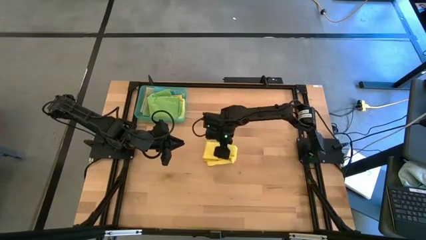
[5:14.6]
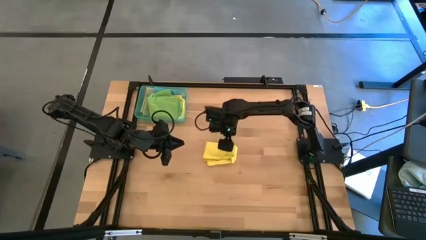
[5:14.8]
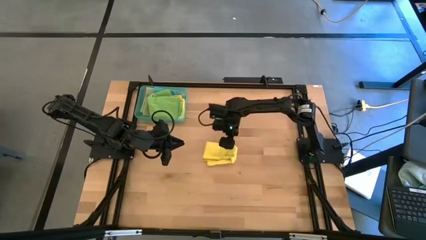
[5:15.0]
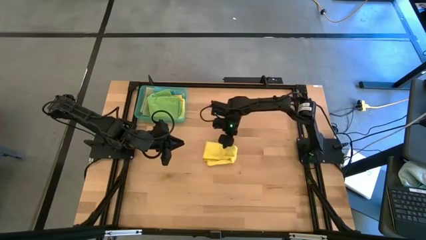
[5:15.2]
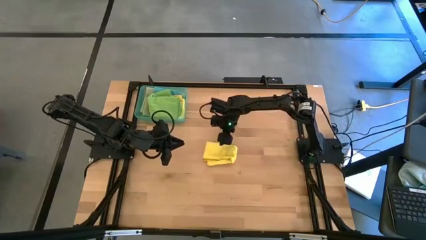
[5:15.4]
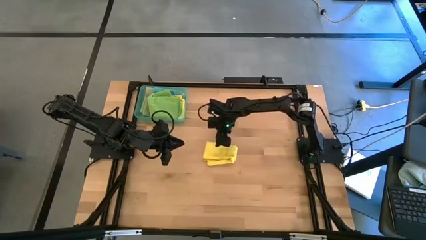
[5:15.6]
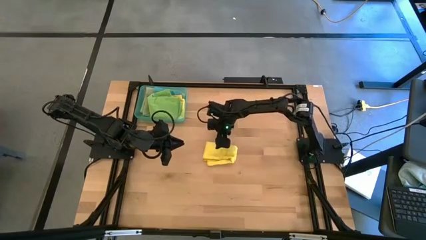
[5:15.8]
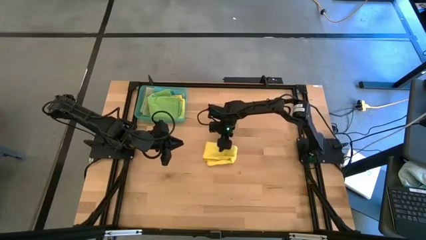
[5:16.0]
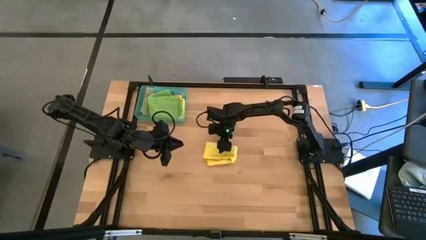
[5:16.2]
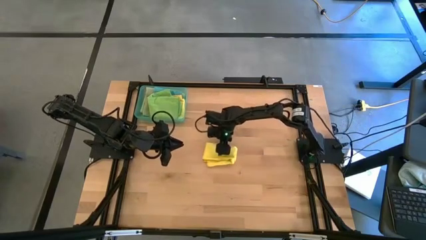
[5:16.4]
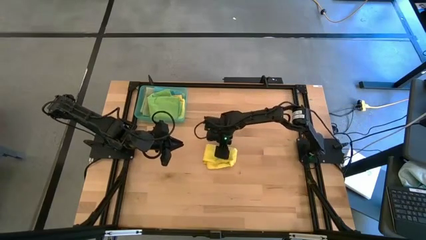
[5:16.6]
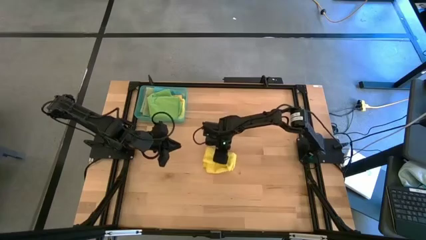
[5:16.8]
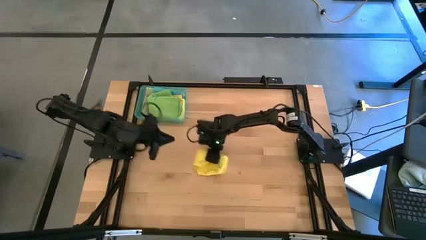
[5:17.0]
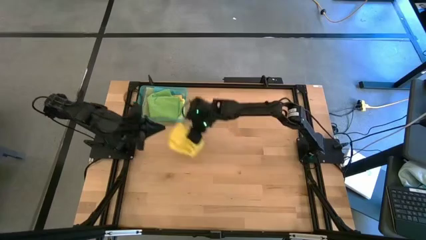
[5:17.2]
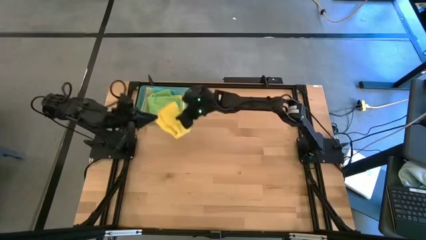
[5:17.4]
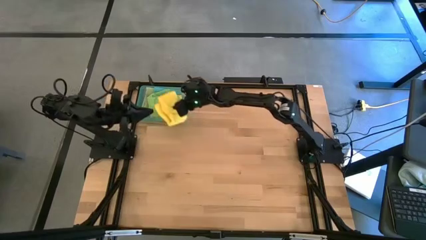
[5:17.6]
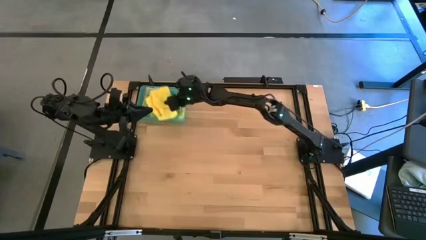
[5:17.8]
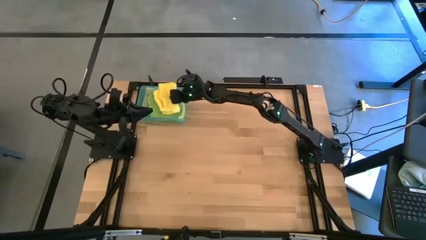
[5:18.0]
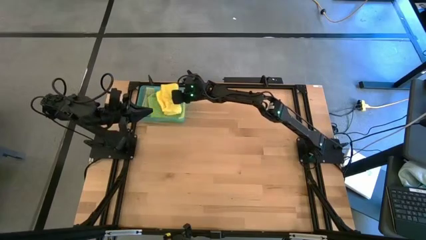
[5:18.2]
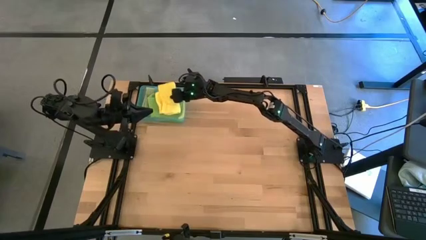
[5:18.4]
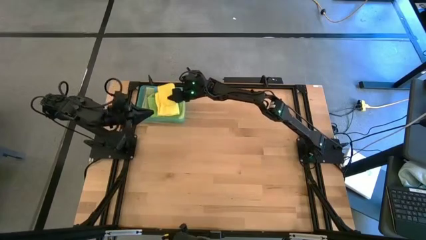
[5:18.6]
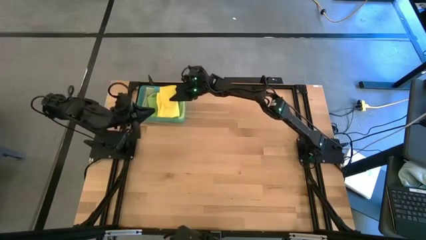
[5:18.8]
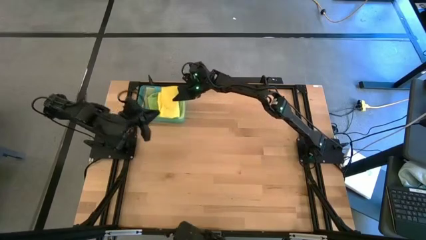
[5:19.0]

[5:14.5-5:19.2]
Task: Fold microfiber towels
Stack the folded yellow microfiber cloth on top of the green microfiber cloth in the blue bin

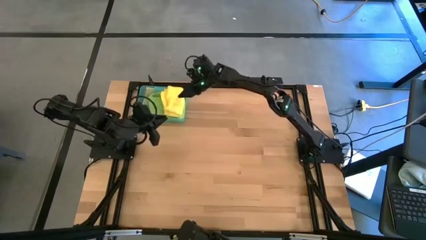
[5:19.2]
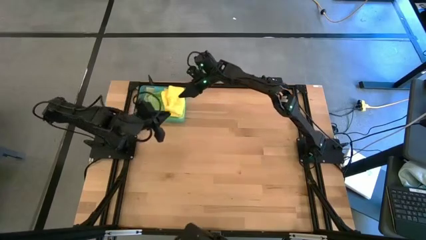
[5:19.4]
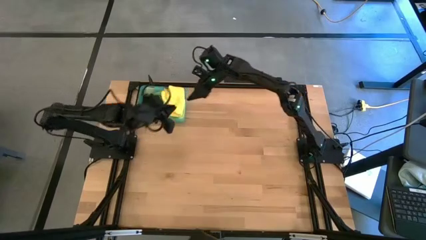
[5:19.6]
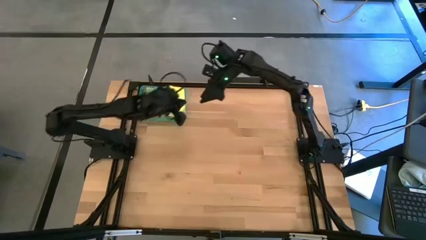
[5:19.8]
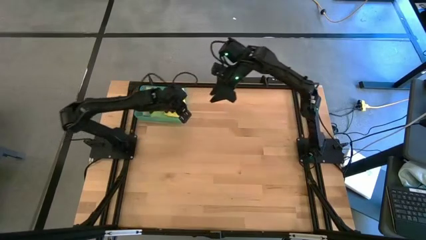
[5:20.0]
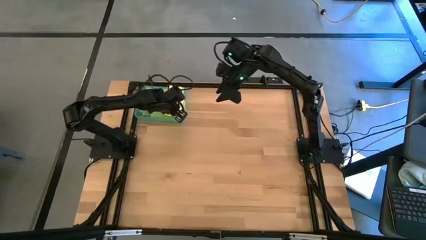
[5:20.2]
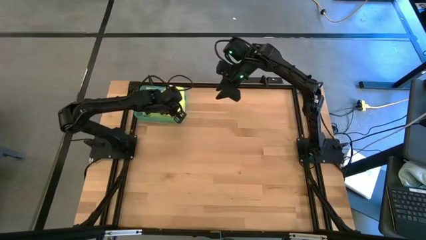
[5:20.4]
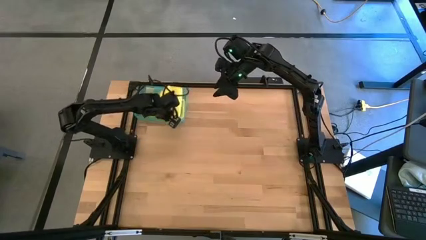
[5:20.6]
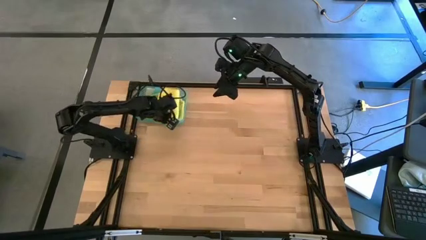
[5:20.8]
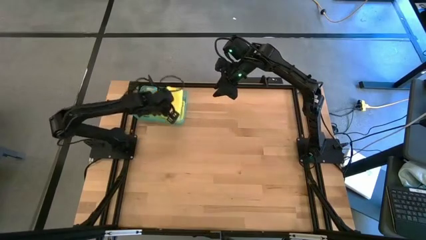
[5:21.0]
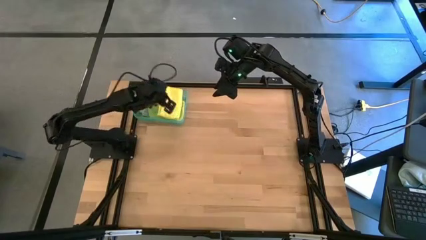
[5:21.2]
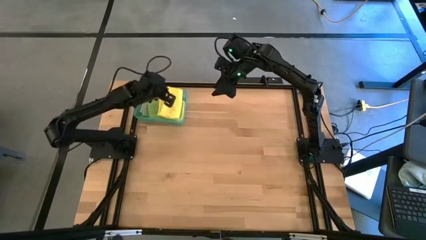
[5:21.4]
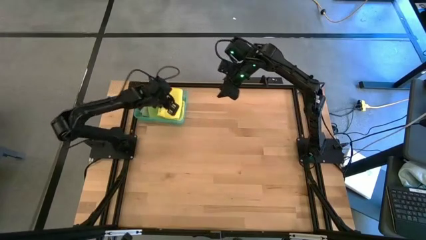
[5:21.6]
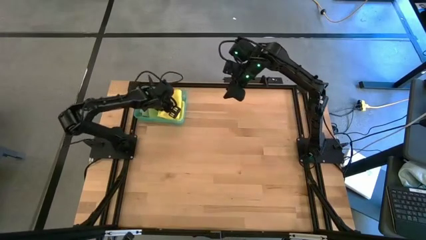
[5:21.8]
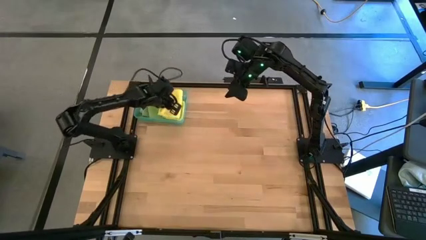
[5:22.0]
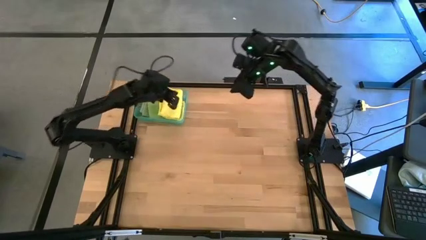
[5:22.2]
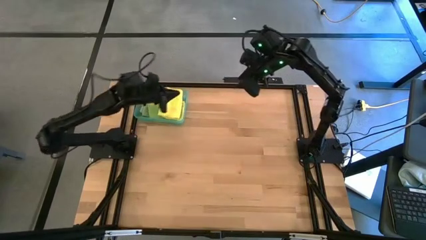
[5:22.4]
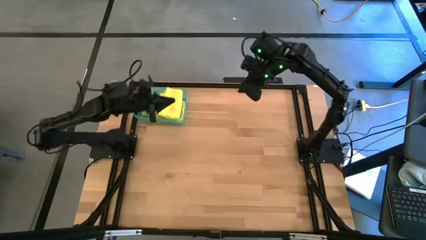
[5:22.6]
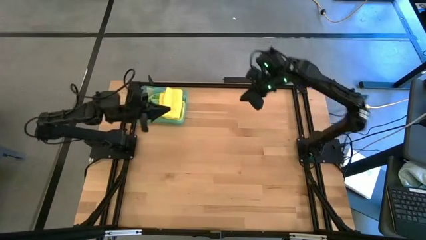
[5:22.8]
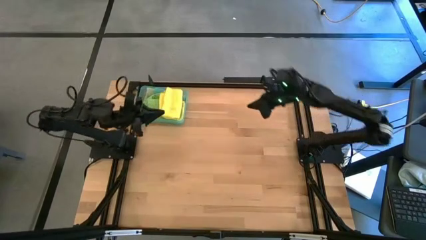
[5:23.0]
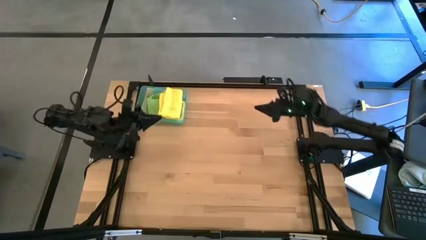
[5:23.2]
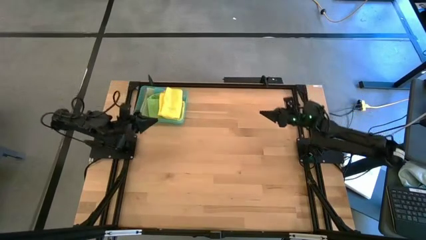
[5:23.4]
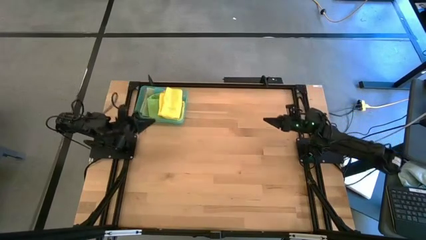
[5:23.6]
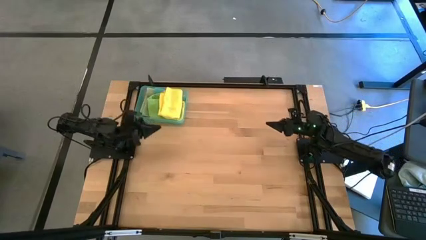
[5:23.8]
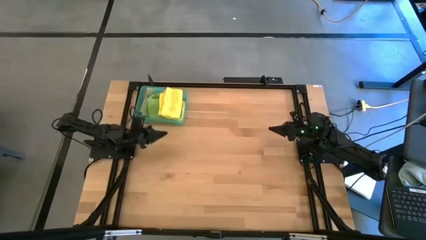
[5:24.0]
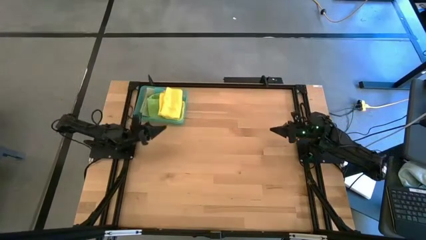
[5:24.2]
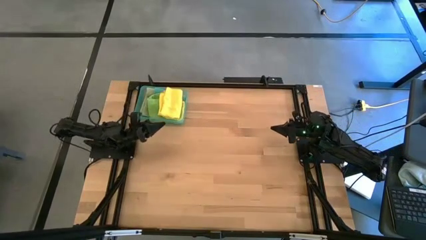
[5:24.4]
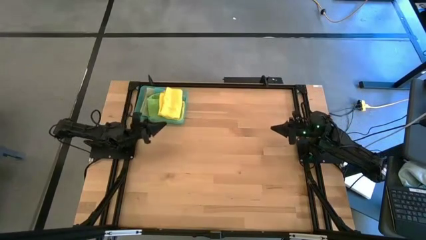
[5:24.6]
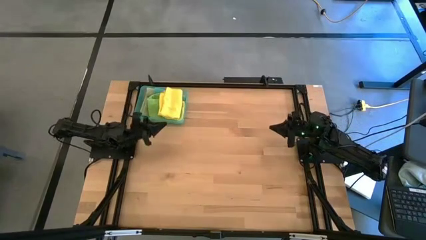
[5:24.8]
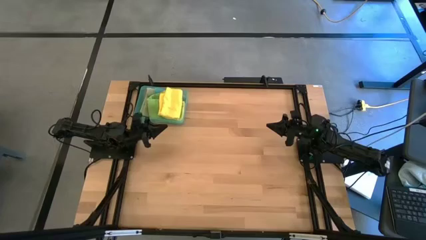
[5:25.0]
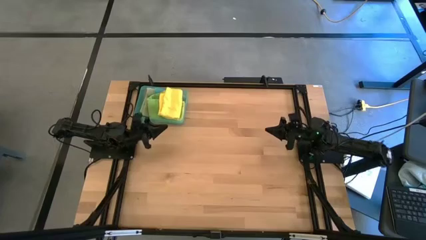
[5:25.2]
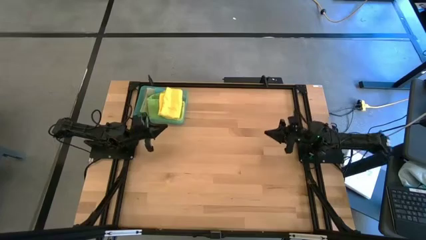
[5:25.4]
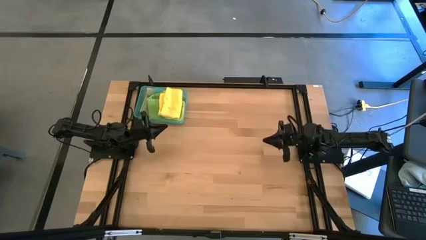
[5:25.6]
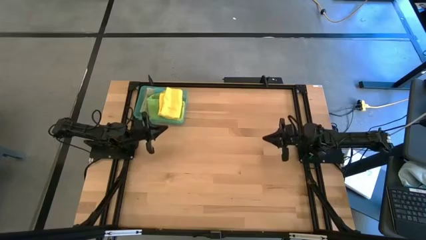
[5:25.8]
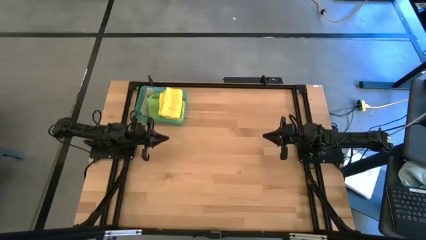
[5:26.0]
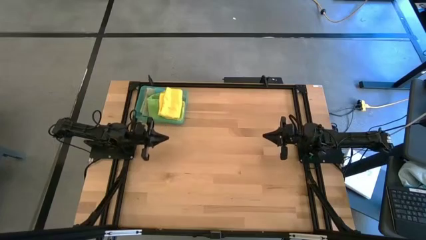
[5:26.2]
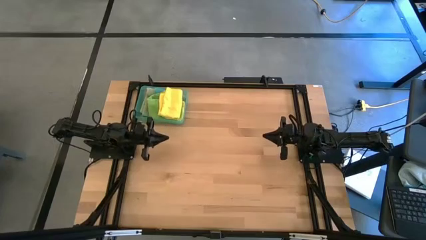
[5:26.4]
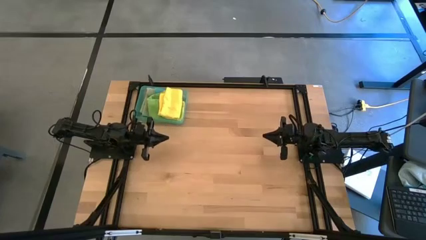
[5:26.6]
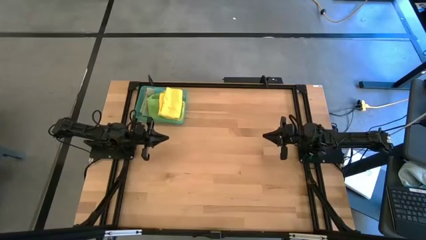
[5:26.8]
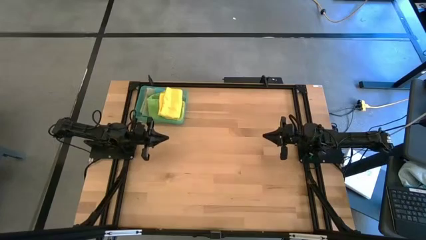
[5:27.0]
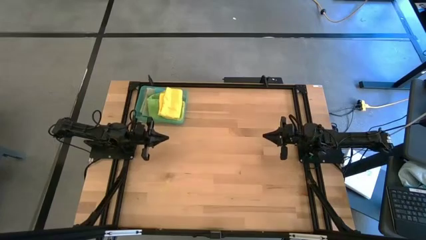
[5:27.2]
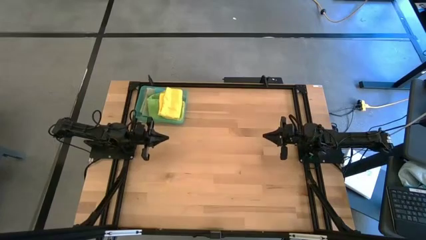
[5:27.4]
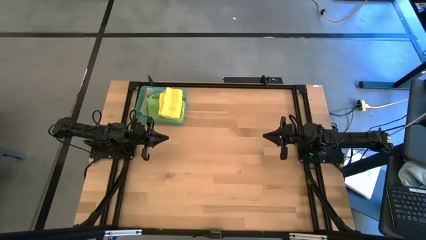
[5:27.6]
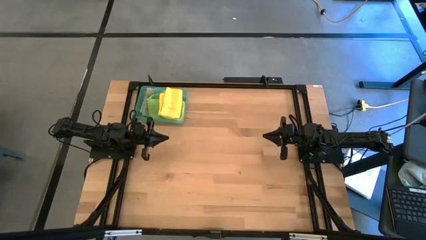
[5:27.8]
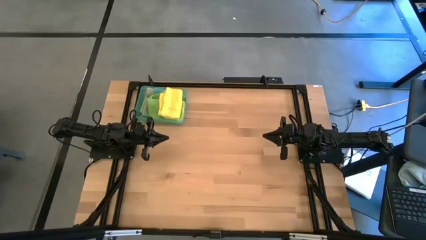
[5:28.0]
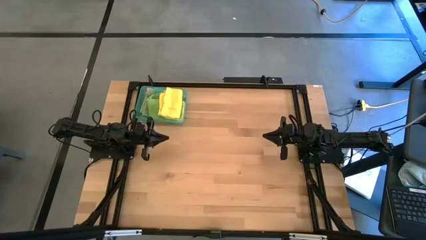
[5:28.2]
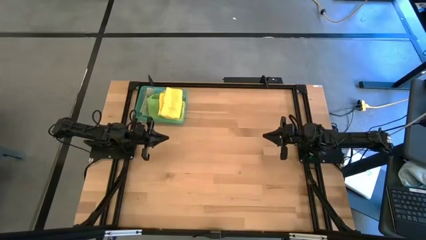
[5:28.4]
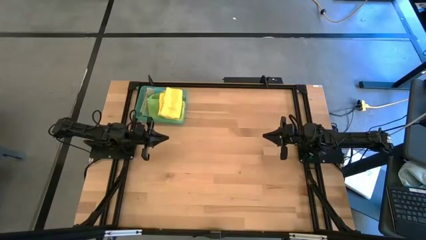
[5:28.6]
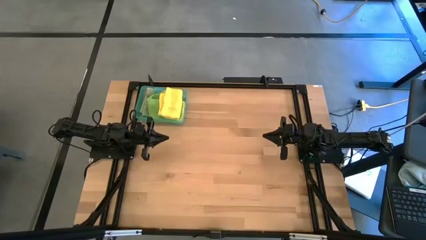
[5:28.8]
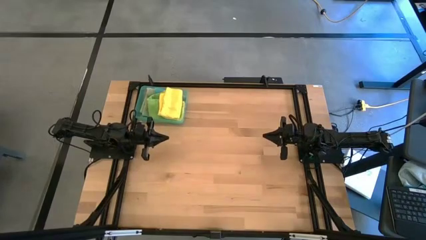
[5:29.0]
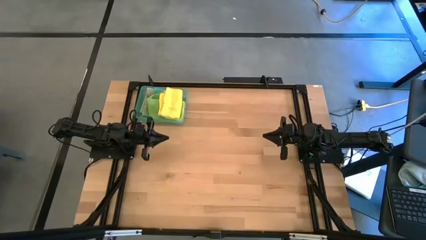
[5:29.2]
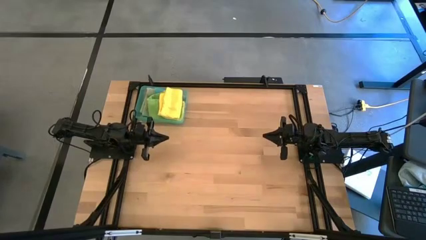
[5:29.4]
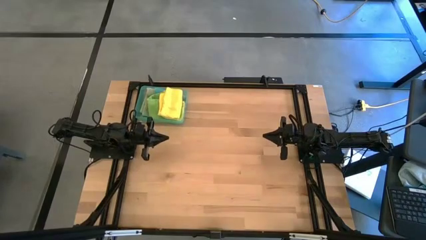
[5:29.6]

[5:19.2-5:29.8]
Return to Home Position

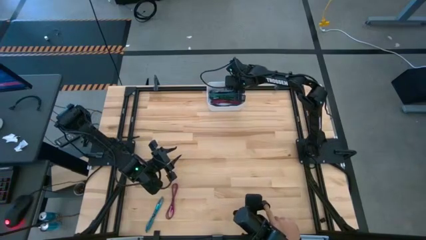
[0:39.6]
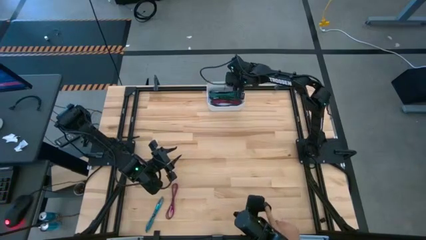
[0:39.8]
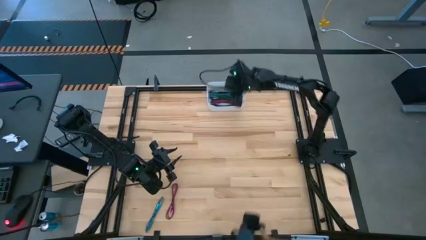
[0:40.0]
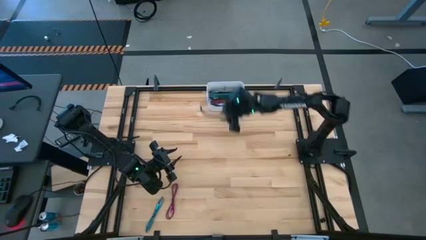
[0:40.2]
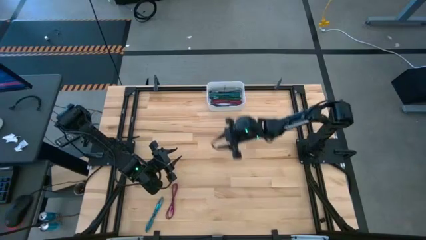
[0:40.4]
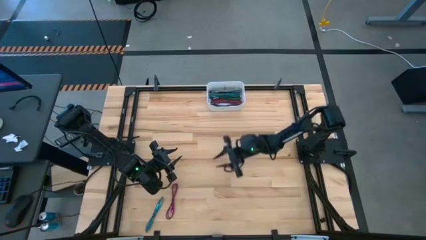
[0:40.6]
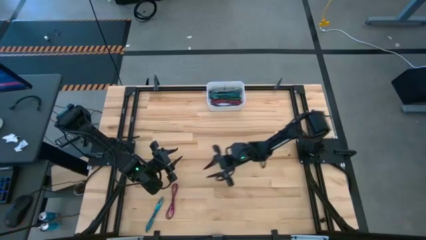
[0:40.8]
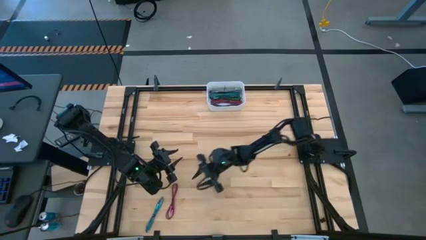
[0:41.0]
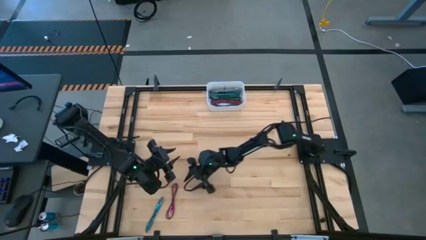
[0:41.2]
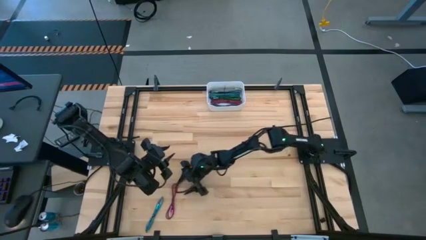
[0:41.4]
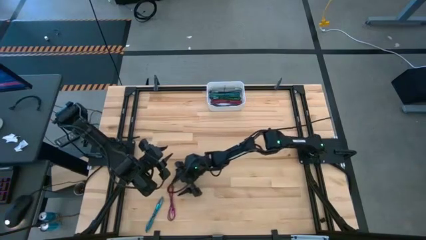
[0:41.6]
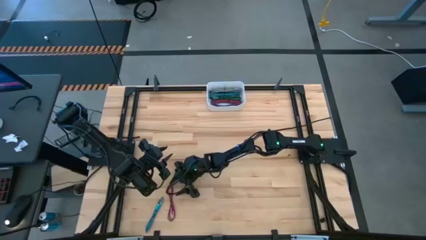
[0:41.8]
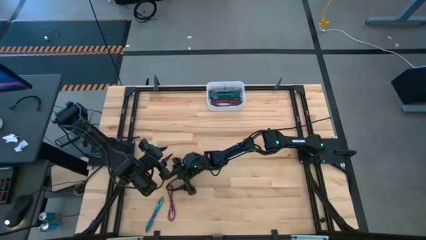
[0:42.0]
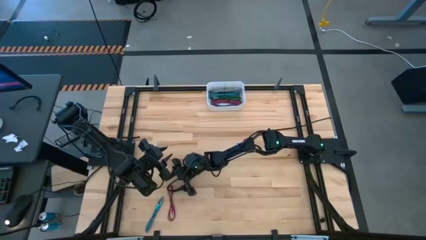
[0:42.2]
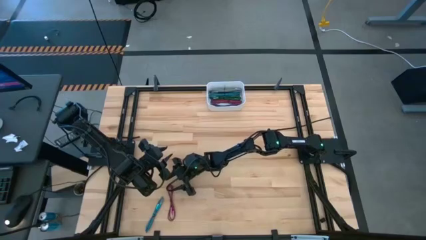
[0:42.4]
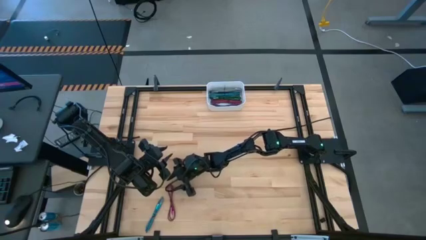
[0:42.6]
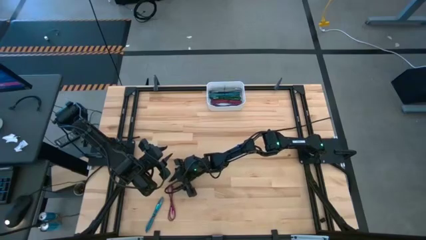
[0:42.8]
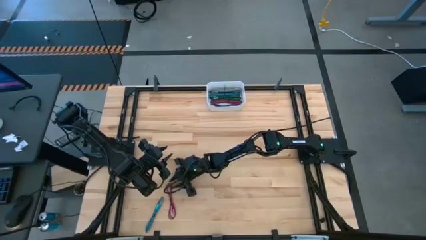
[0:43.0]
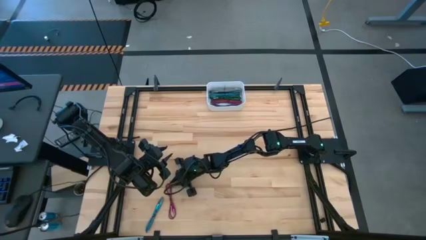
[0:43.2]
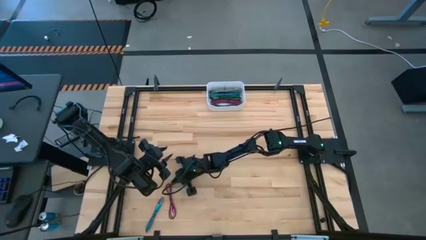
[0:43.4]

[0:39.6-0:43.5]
Task: Pick and place USB-C Cables
Put the pink charger cable into the white bin
